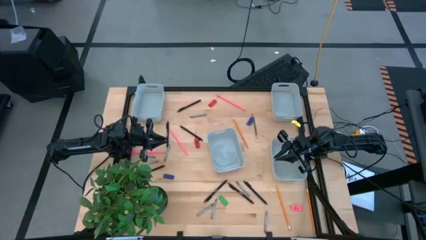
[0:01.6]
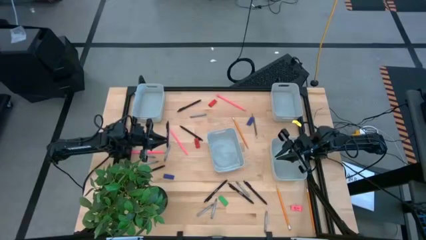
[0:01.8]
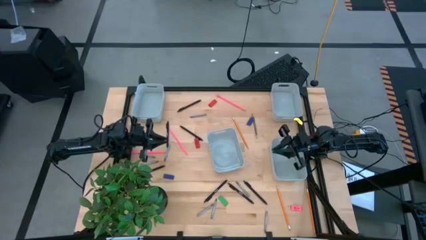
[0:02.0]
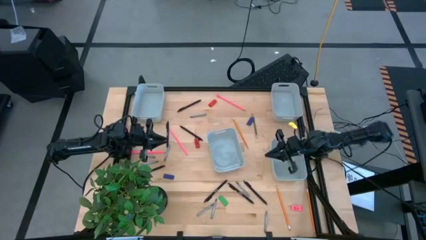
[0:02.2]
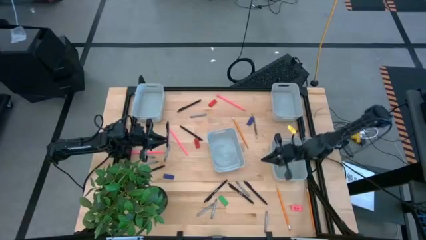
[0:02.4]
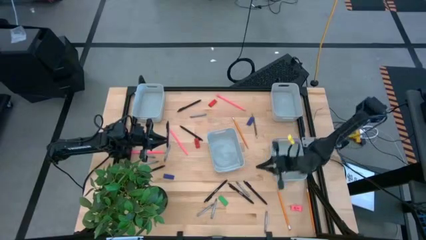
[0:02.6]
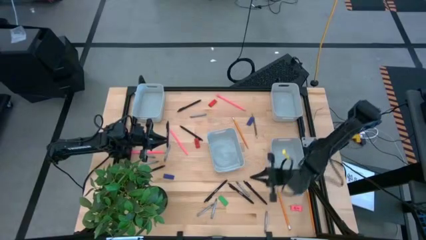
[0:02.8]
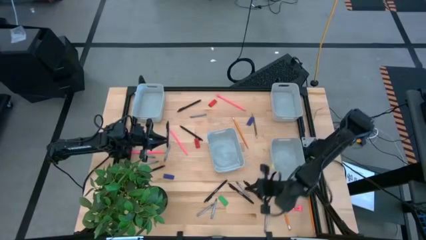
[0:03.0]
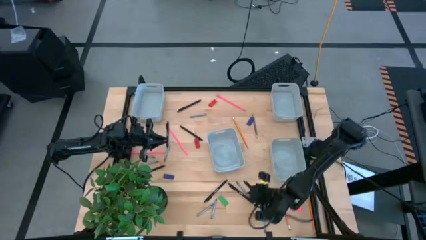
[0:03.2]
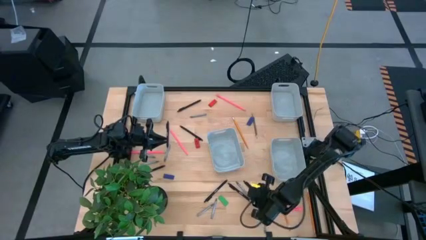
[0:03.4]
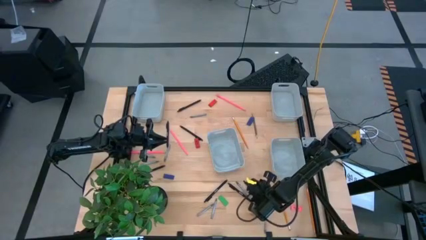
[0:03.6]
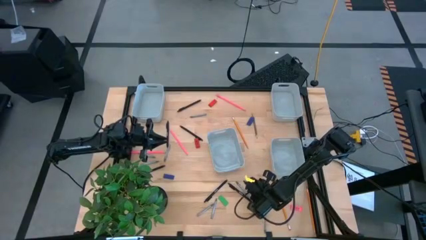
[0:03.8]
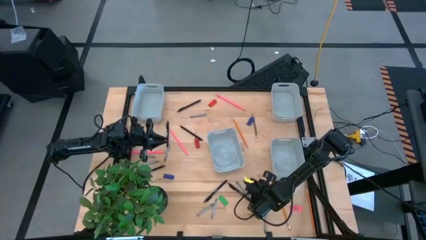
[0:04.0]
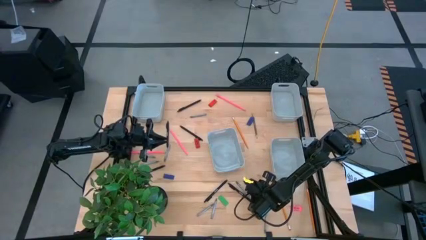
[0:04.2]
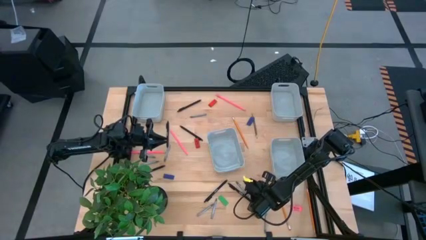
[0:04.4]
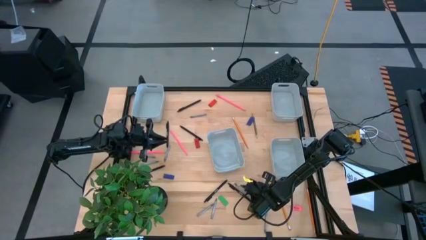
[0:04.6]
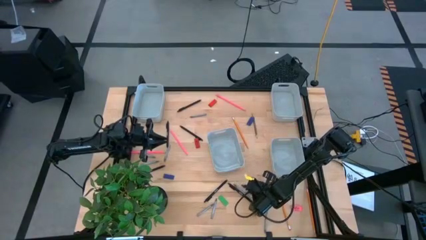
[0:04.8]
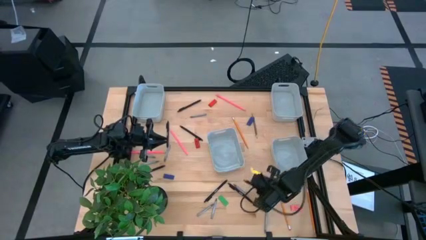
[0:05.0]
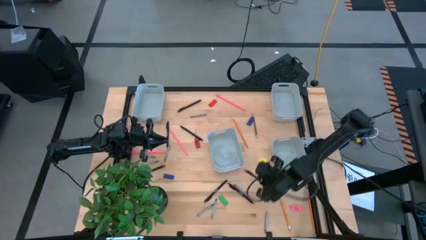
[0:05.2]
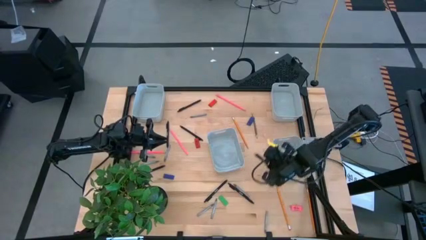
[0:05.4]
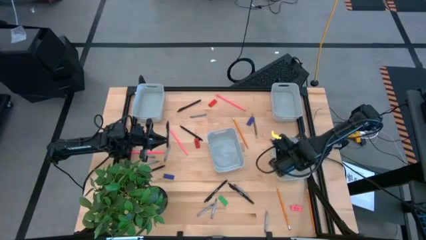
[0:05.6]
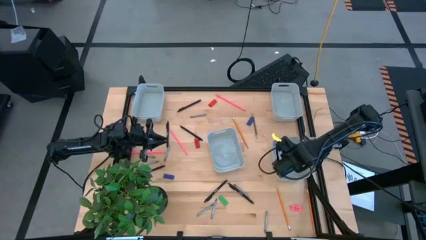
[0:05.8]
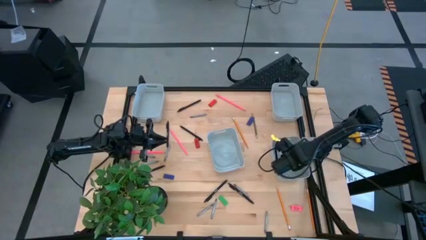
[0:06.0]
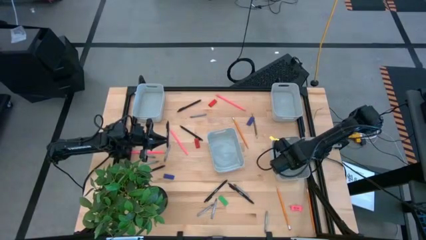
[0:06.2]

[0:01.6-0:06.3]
Task: Sort crayons/erasers/pens/pencils in bins
Put the black pen into the bottom right gray bin

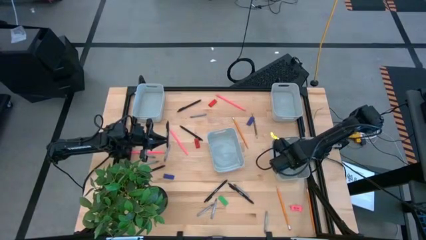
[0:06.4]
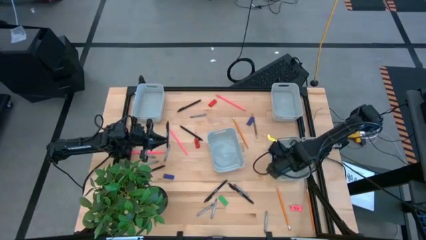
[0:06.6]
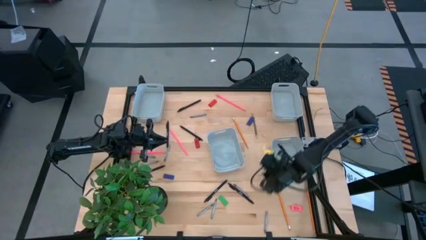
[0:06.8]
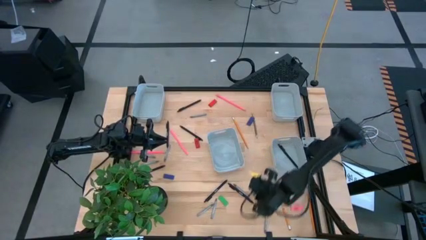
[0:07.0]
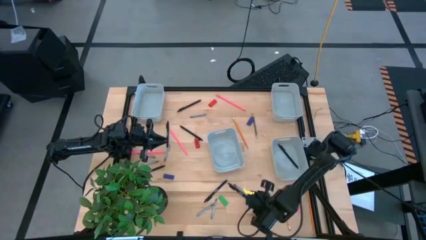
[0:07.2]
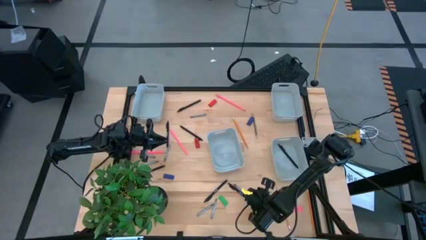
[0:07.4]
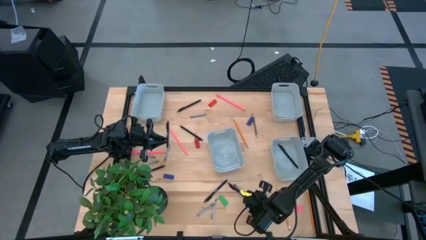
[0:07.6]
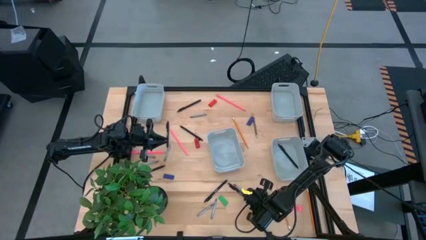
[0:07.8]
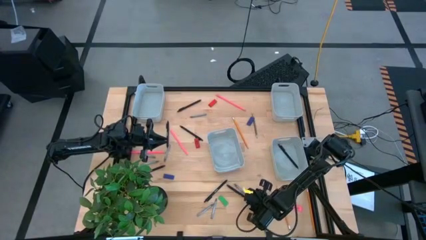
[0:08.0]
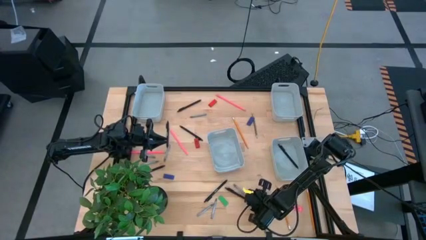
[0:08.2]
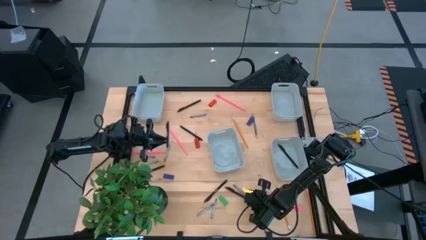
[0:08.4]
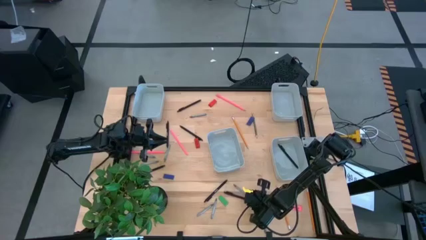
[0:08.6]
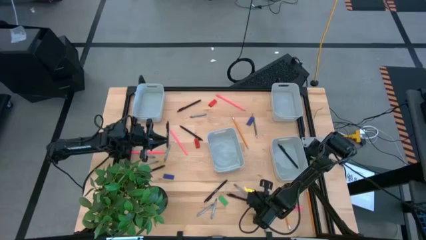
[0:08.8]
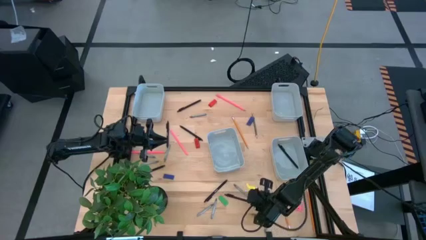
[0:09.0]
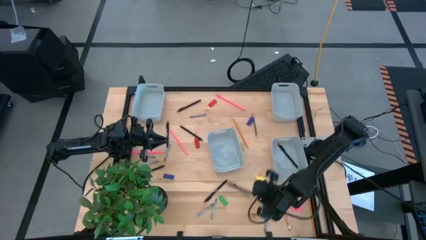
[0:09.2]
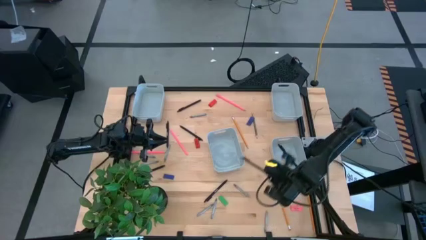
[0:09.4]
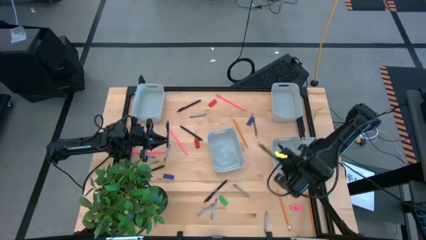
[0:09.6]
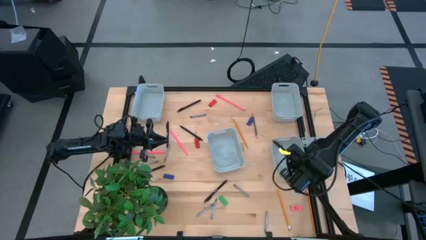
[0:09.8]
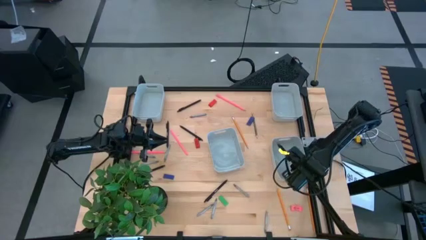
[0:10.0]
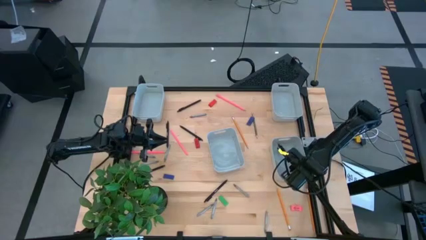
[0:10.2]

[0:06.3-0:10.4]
Put the black pen into the bottom right gray bin

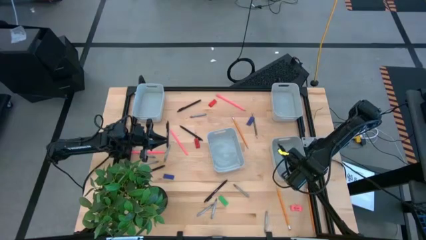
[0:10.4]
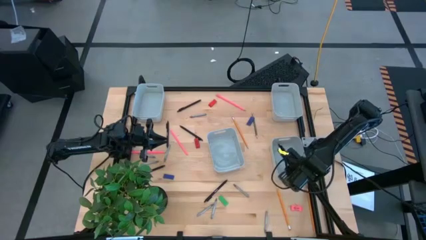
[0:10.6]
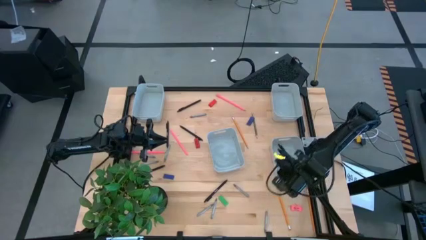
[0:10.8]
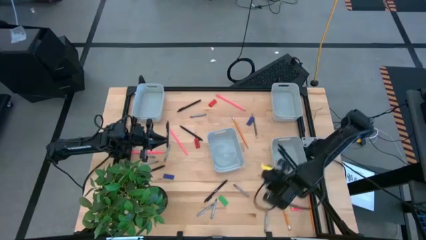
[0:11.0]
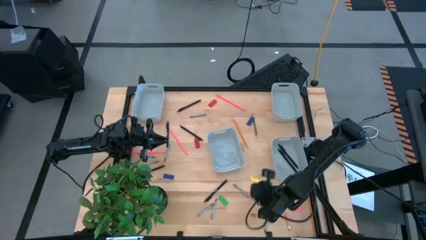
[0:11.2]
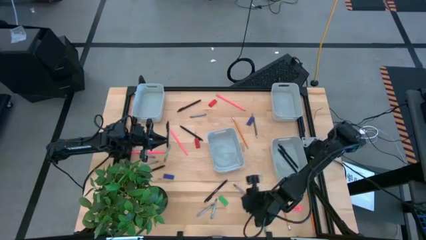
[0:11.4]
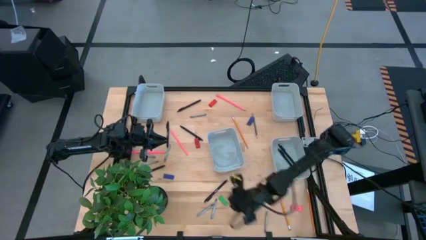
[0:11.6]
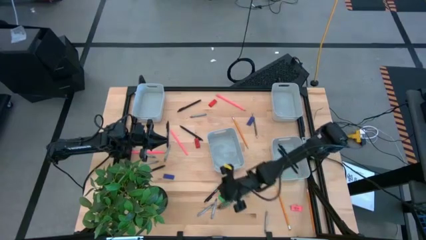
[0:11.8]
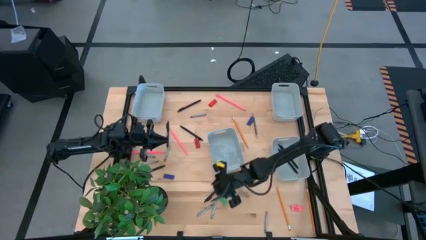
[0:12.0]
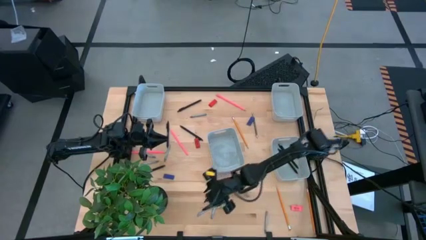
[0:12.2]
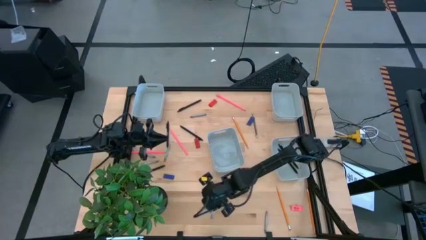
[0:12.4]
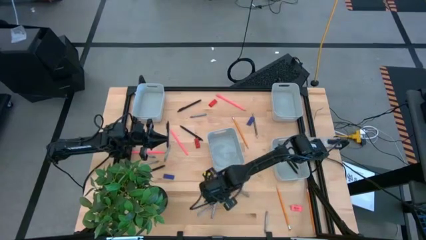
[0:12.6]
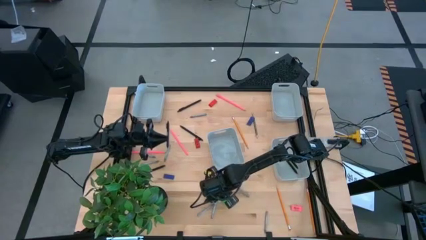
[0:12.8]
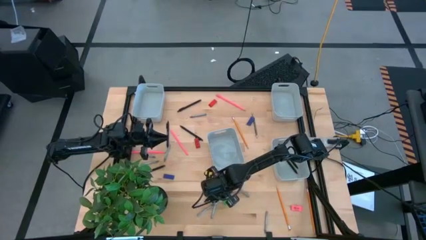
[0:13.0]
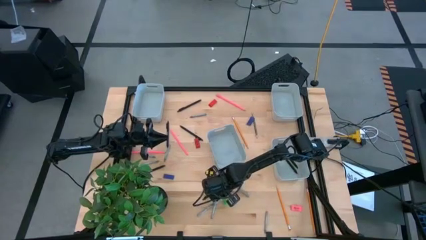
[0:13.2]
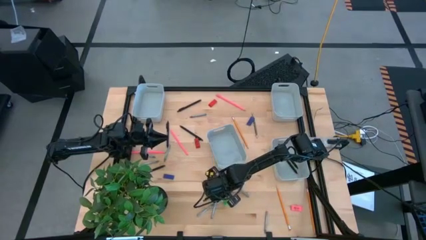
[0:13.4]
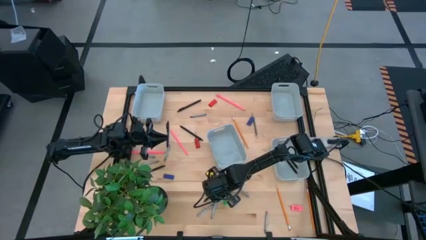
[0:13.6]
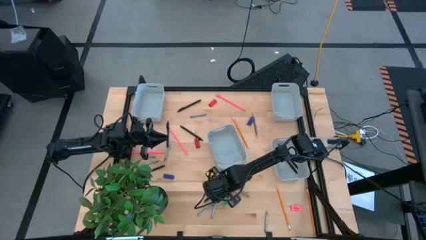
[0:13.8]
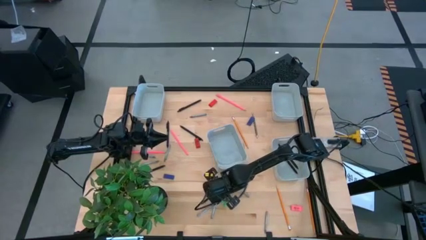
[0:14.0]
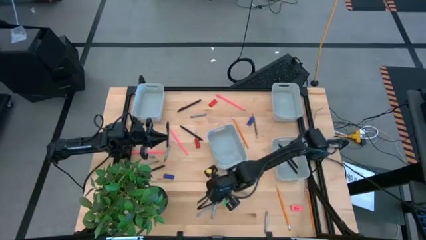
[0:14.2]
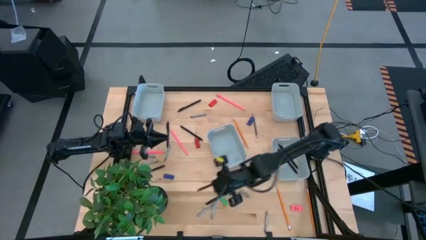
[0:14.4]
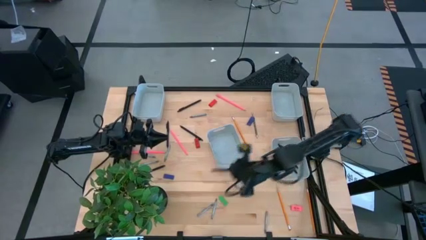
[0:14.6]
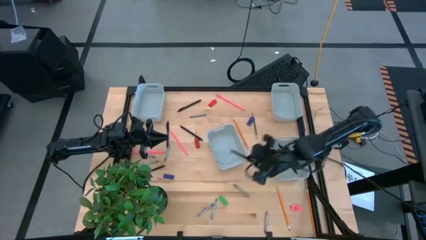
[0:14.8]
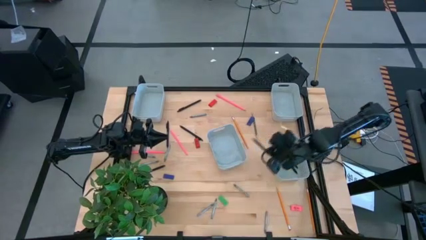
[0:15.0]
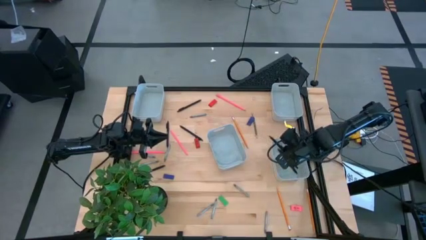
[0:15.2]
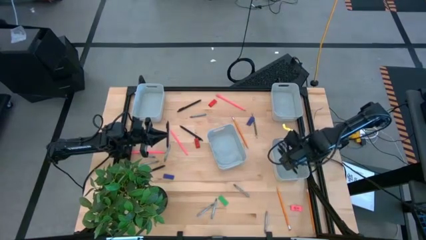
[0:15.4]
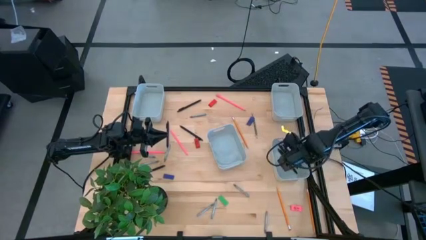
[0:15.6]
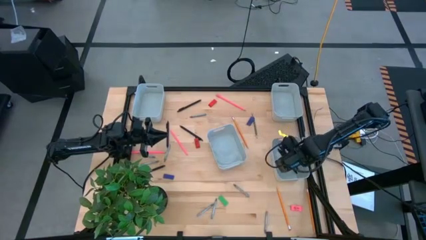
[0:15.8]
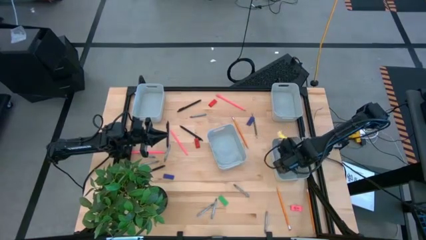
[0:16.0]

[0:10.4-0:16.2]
Put the black pen into the bottom right gray bin

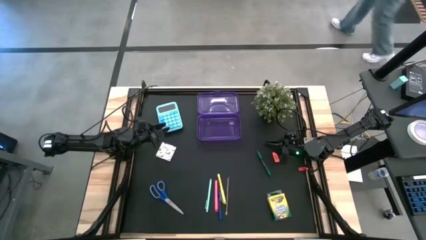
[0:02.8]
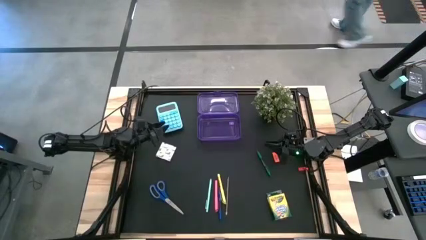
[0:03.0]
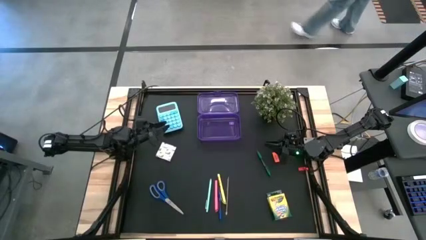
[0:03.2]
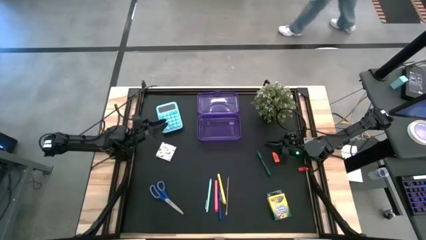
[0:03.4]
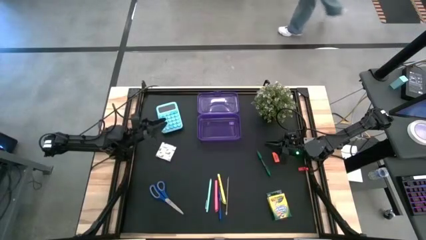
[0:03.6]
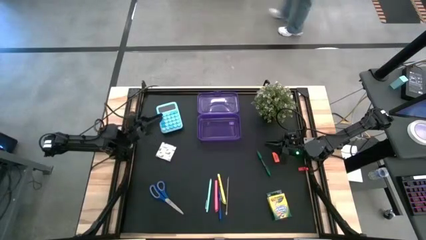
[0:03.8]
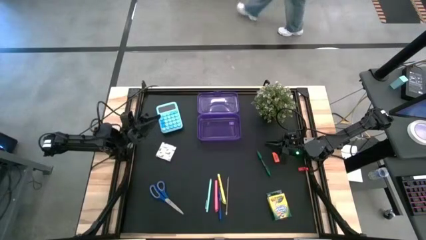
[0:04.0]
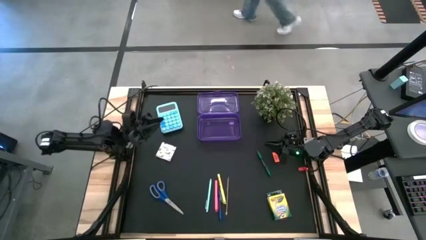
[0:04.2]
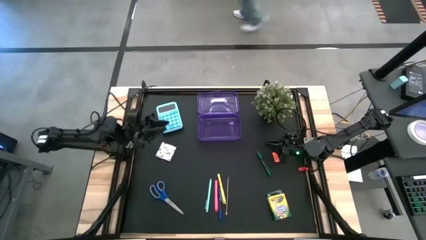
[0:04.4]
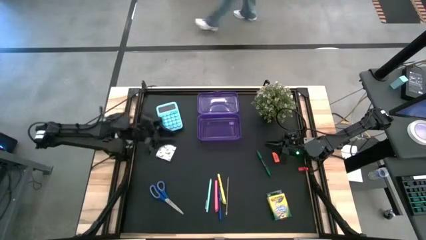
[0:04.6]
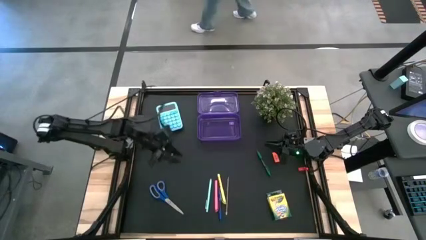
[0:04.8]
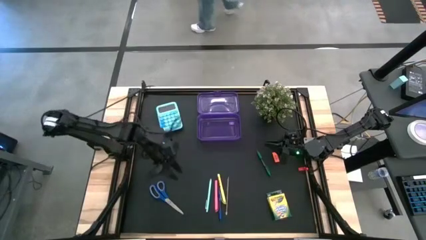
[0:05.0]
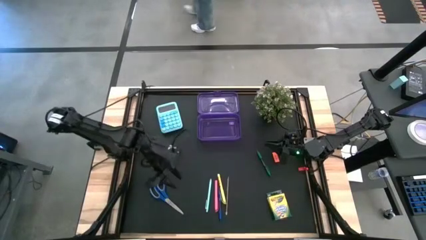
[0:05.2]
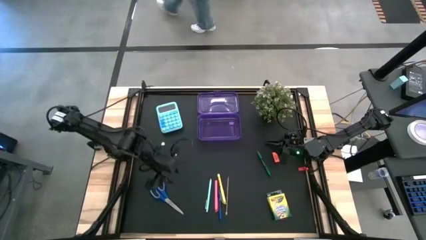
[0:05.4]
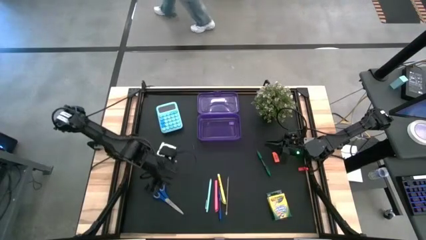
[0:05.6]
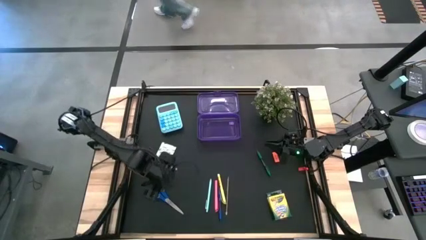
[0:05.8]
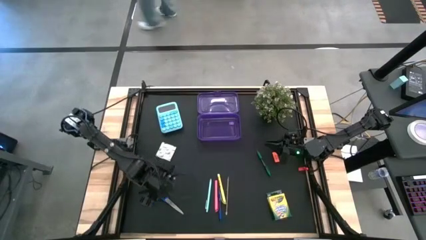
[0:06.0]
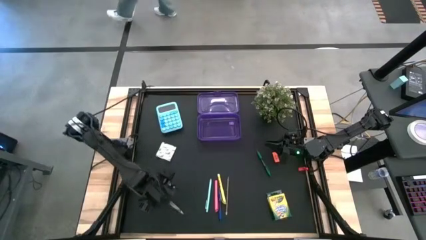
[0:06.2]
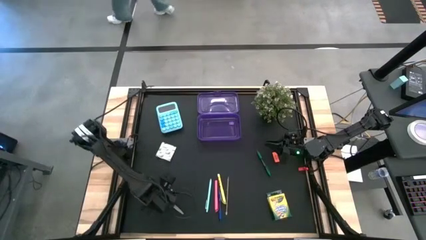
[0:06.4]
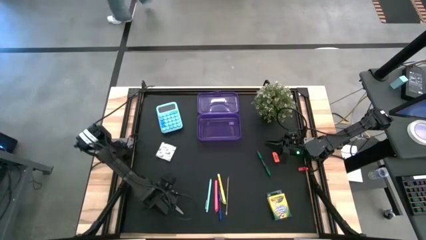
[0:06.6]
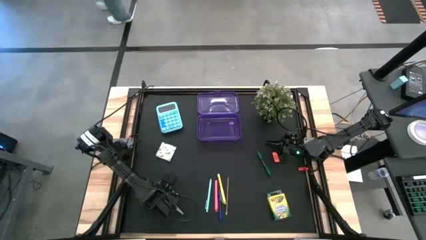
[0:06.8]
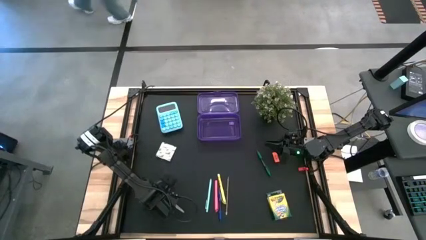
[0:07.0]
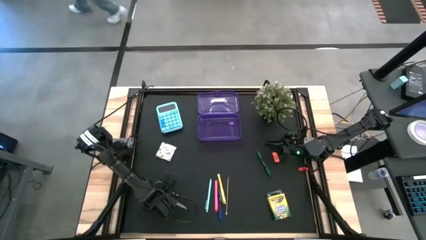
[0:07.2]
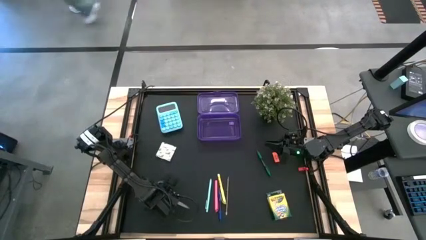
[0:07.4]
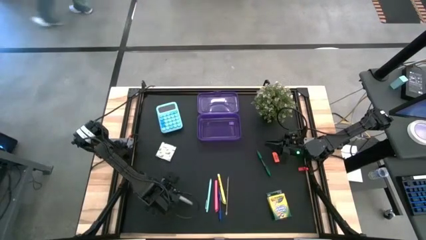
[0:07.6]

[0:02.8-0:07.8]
Task: Pack school essentials
Put the blue scissors into the purple supply box
